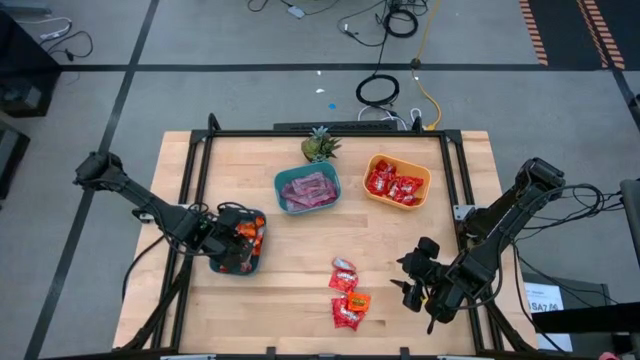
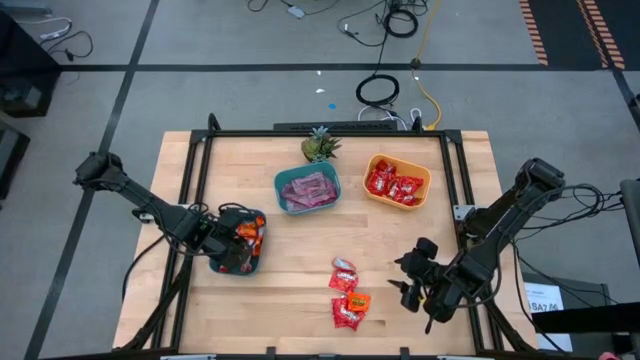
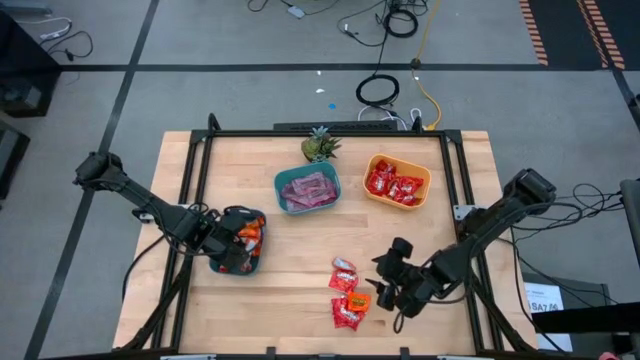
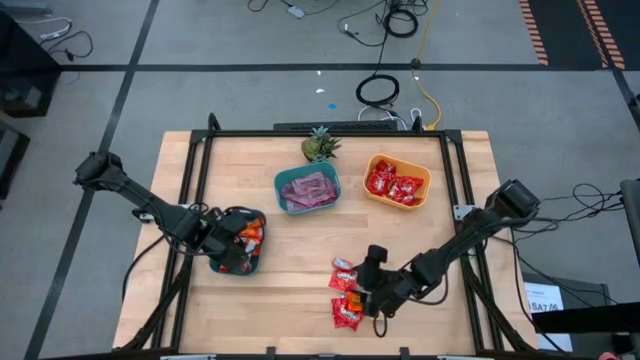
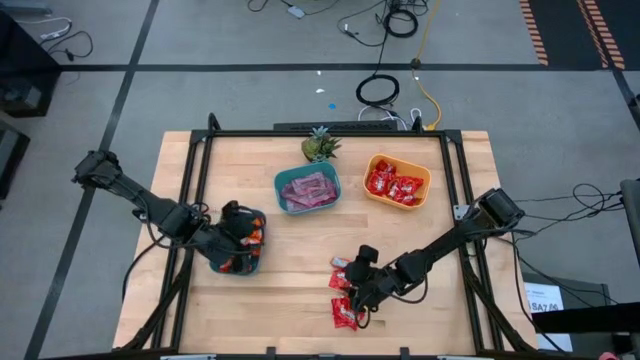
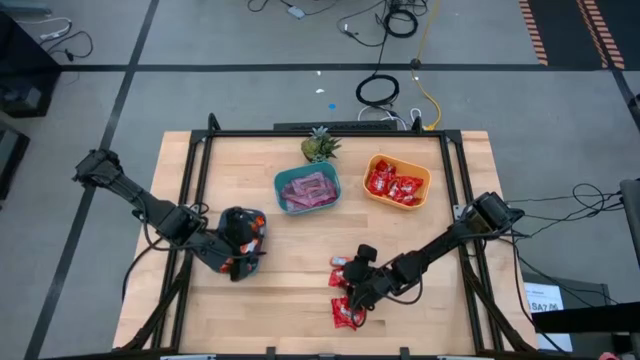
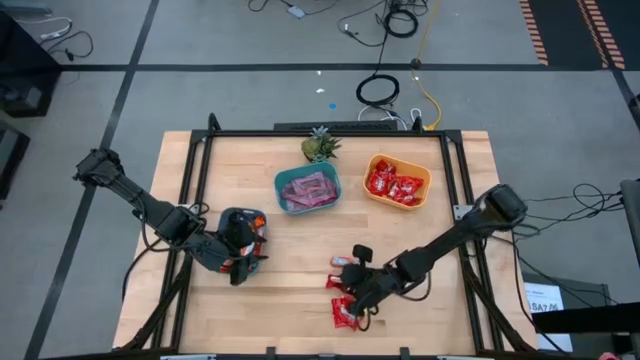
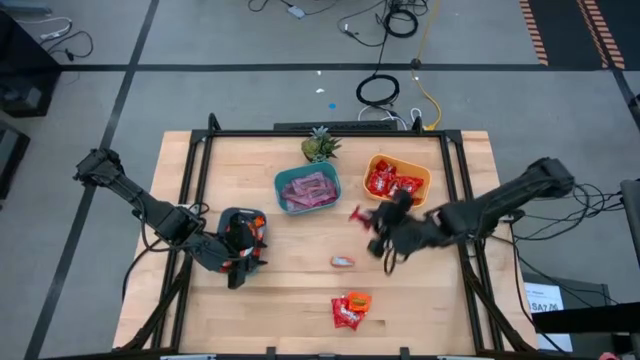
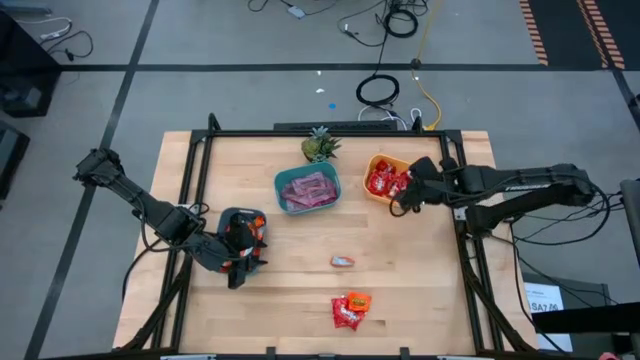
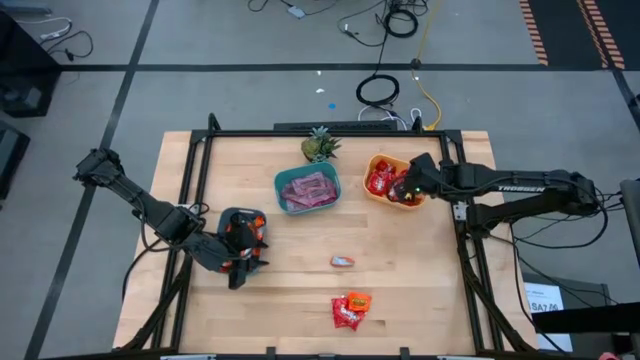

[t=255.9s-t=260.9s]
Task: Sort candy
Put the red candy into the yellow bin

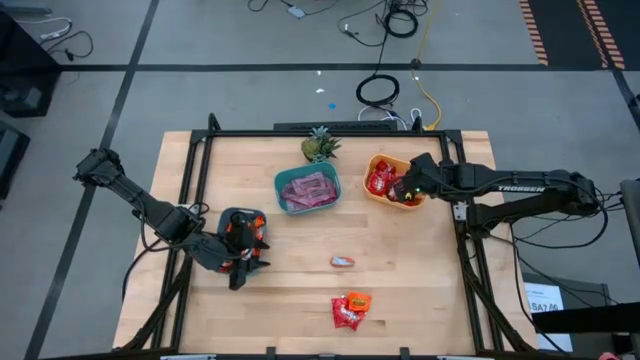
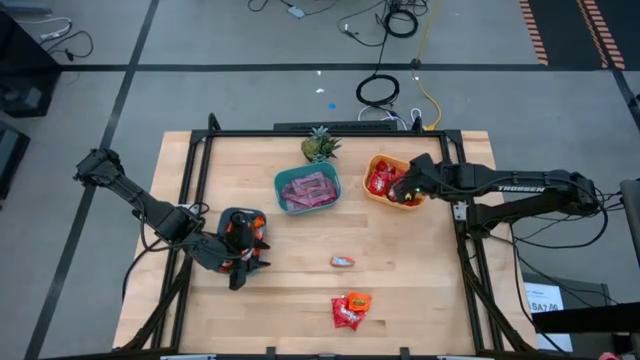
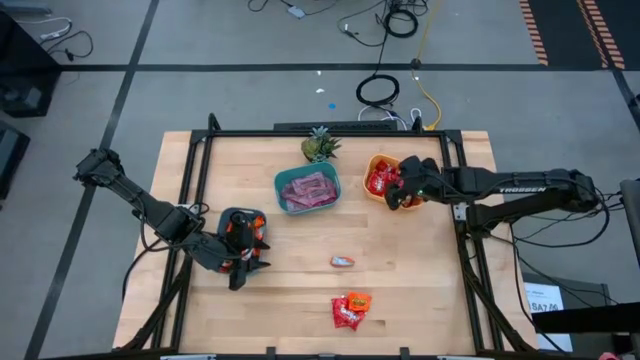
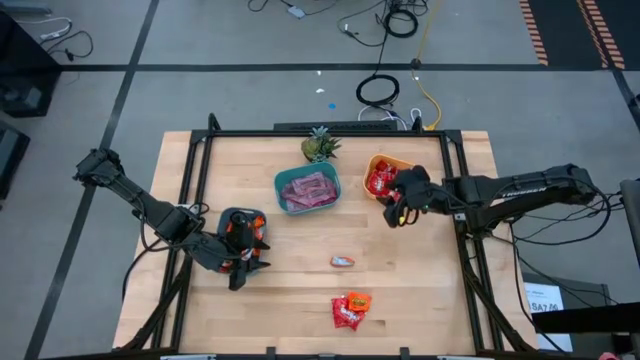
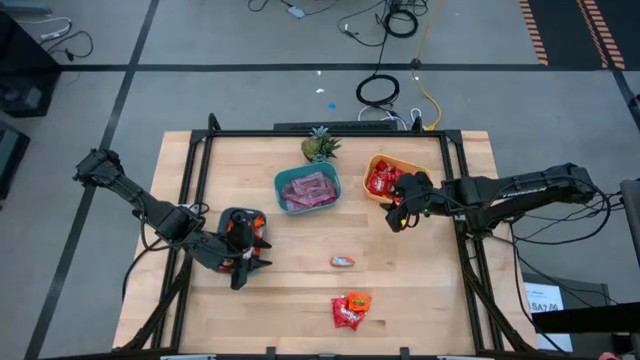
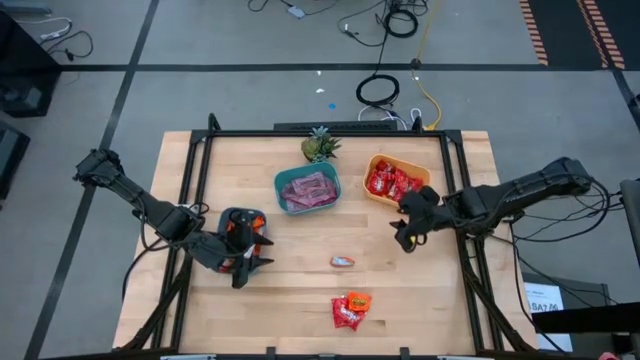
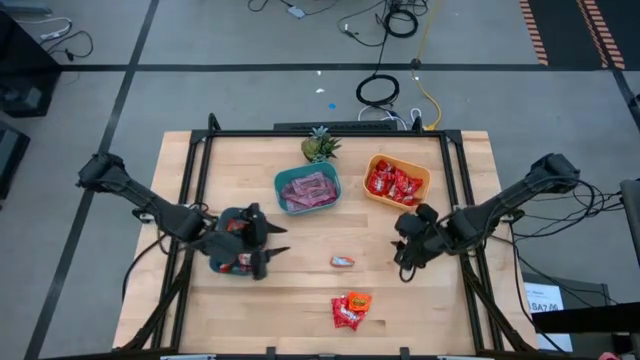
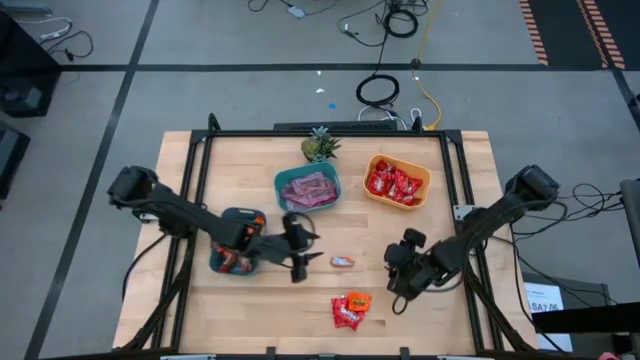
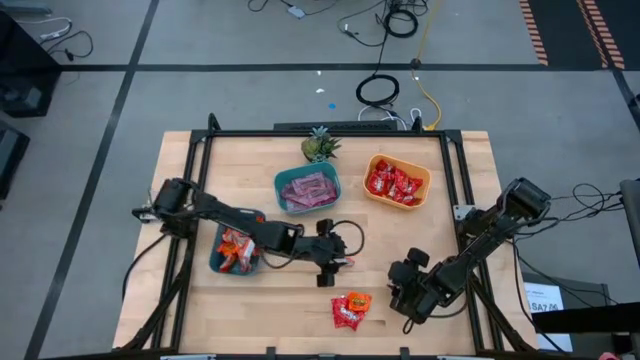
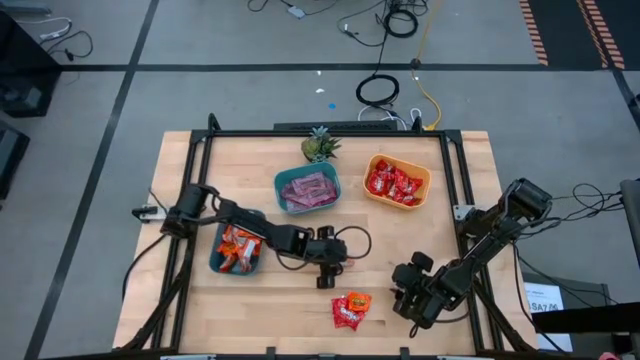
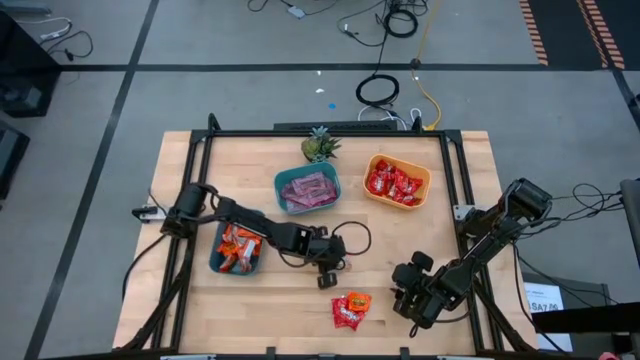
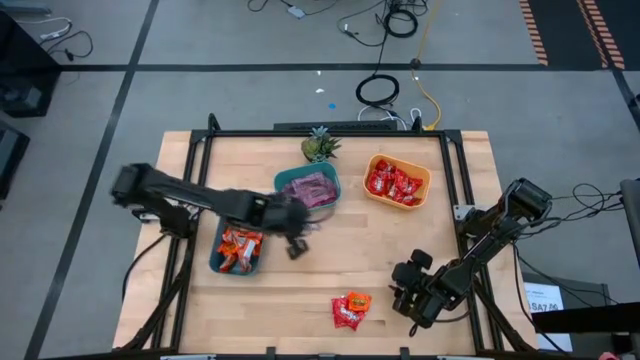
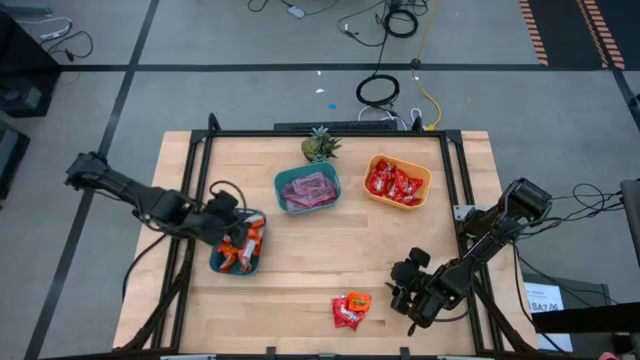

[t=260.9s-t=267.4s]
Put the orange chocolate into the blue bin

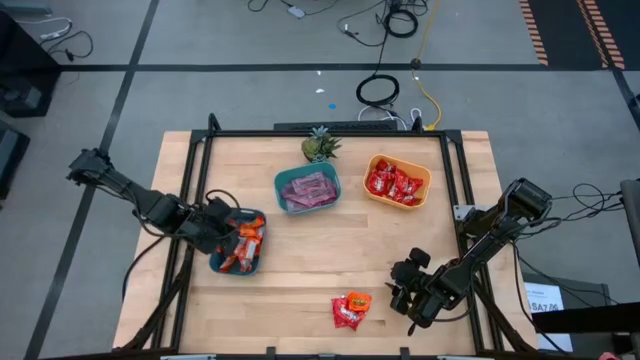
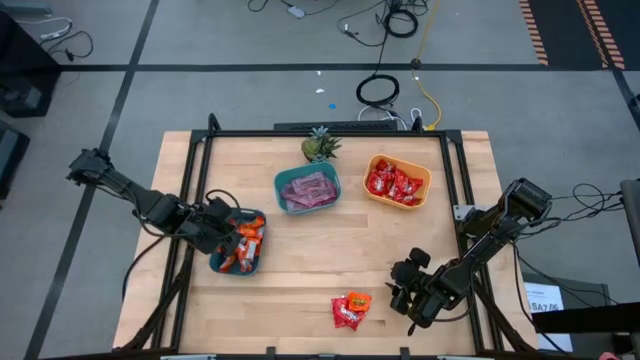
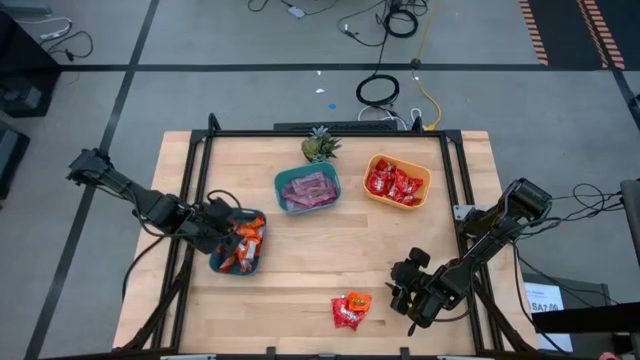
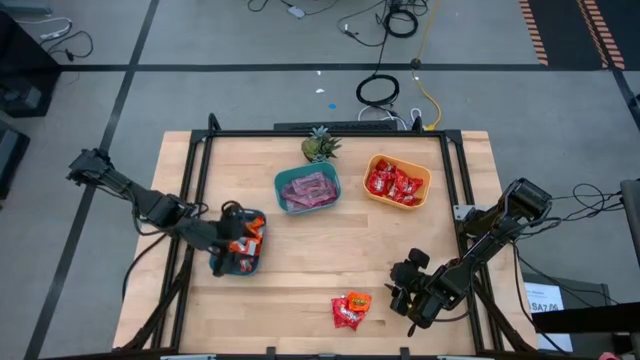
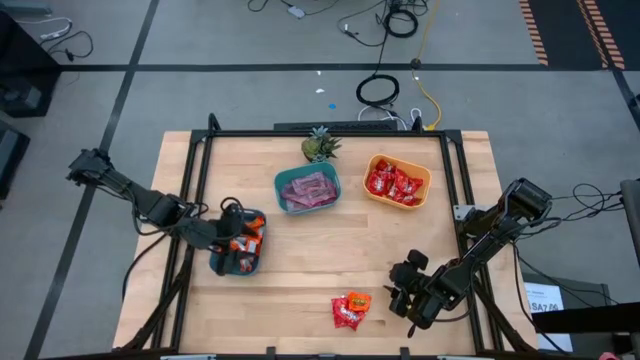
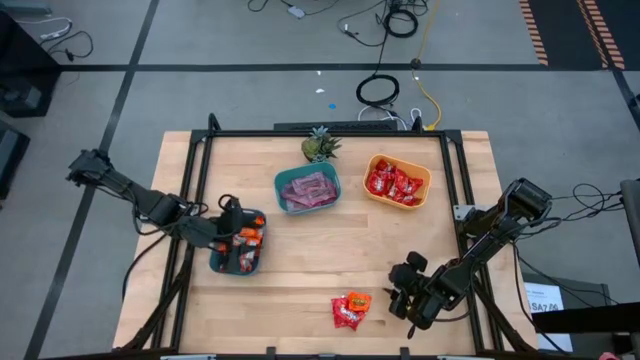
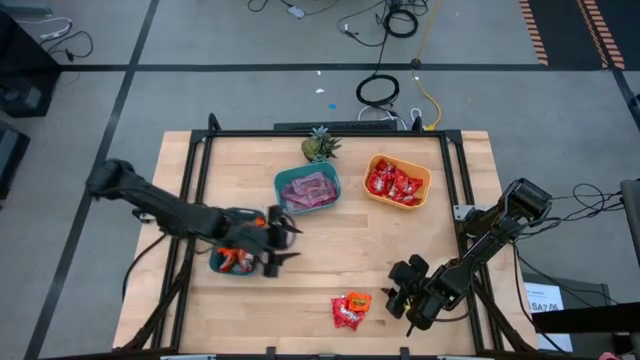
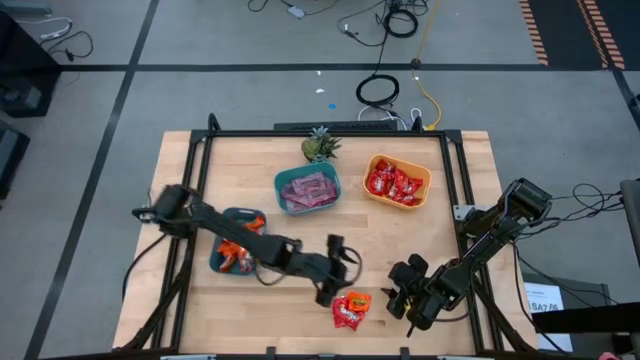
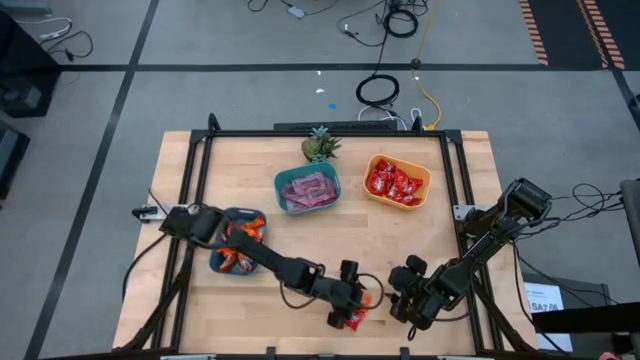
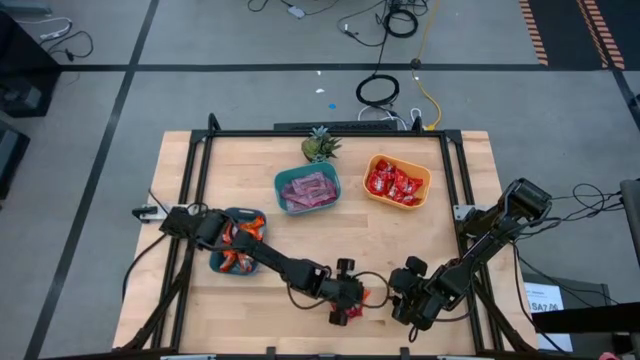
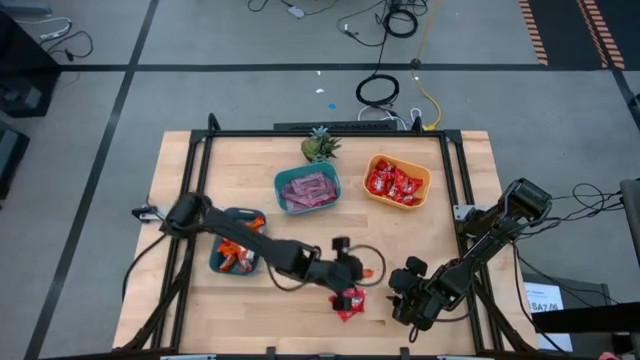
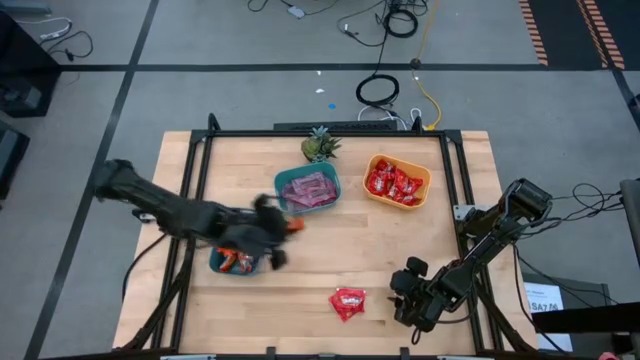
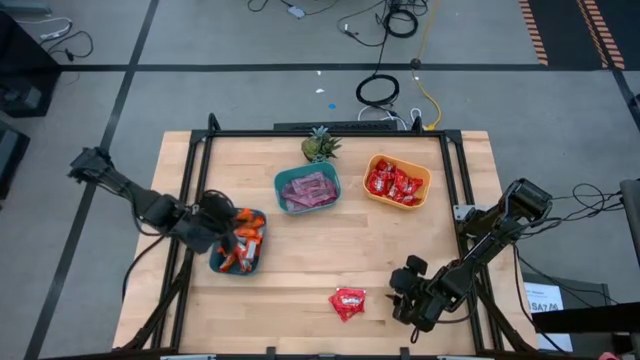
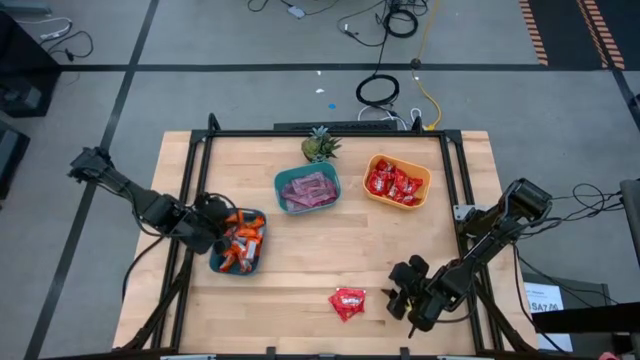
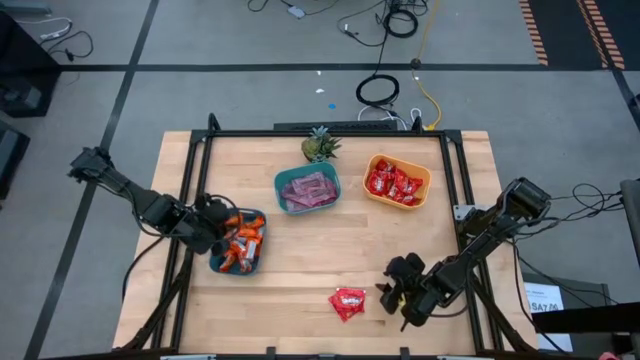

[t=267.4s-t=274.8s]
Put the orange chocolate into the blue bin

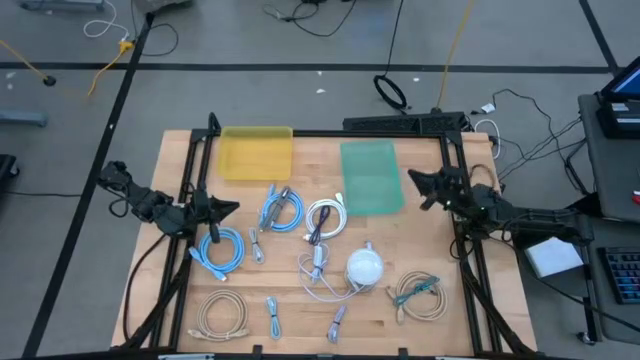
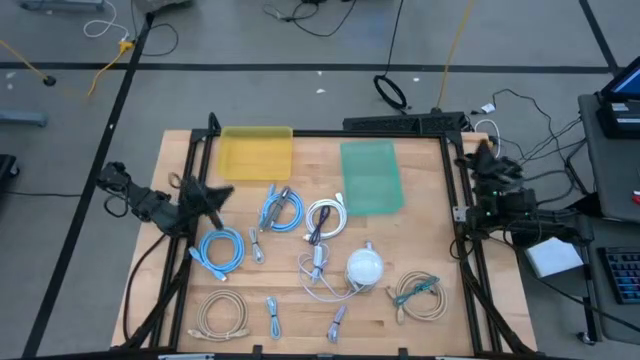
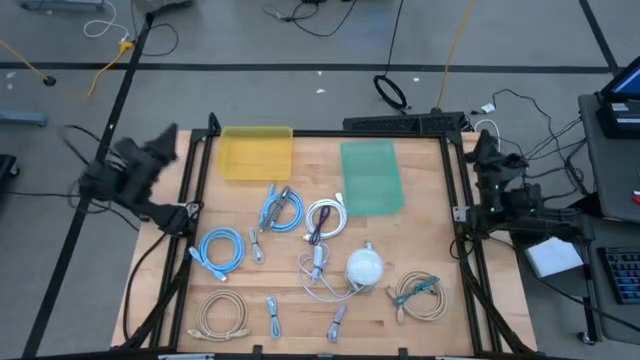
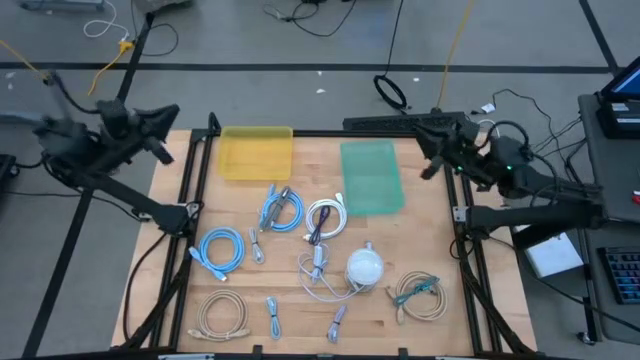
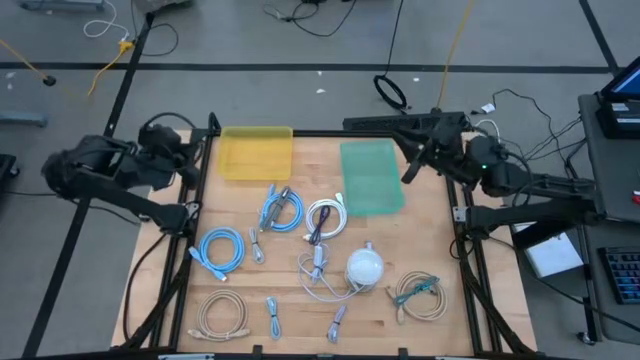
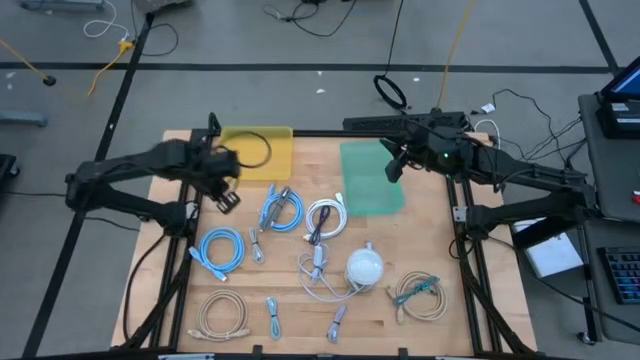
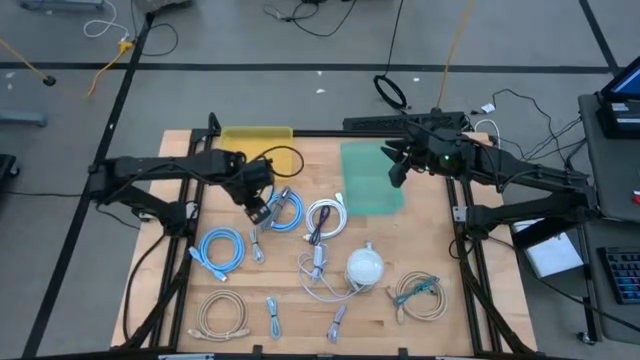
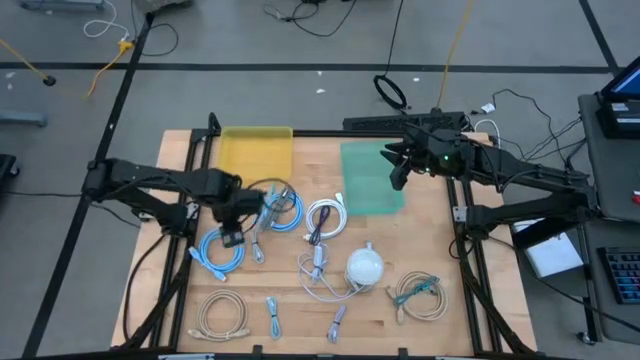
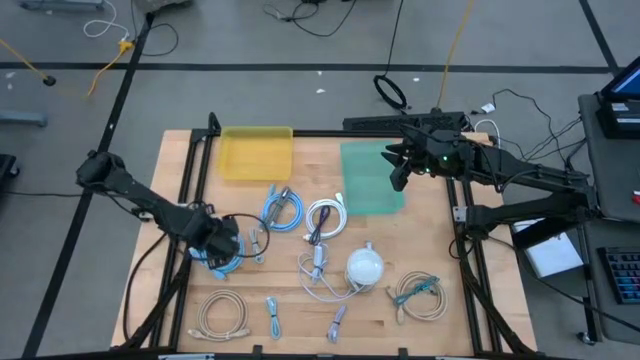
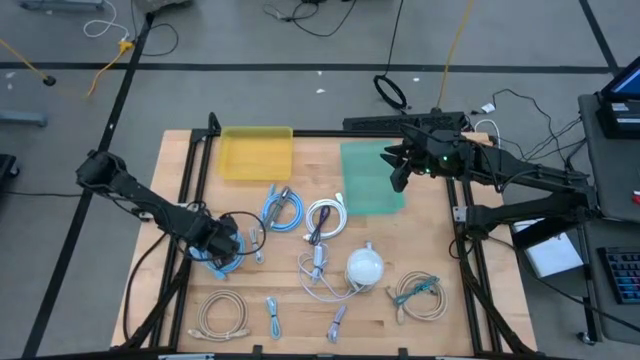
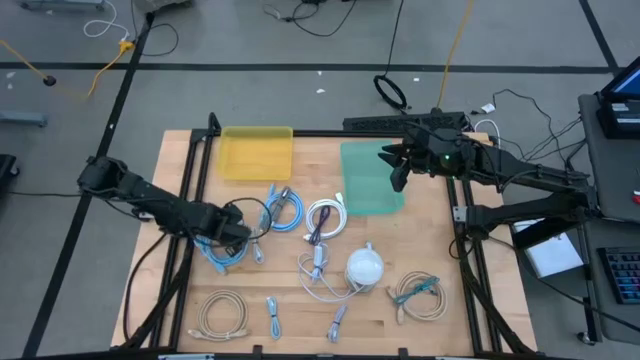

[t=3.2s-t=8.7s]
Task: Pick & Place USB Port
Put the left blue HDMI cable into the yellow bin
